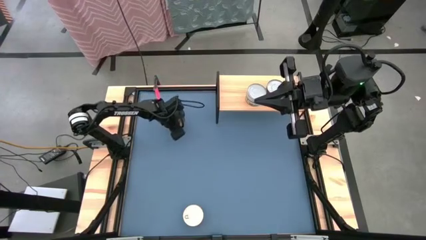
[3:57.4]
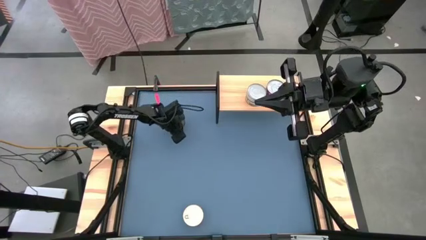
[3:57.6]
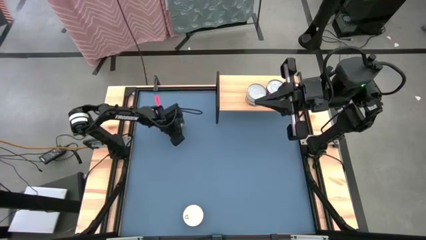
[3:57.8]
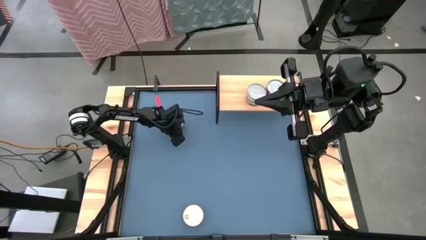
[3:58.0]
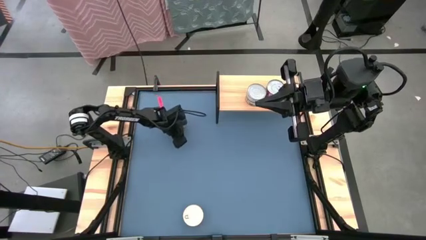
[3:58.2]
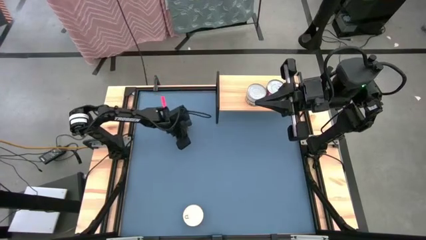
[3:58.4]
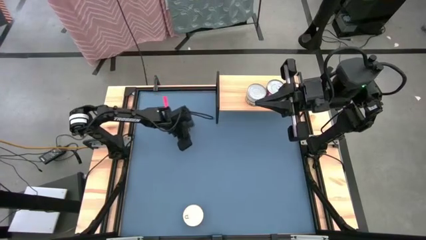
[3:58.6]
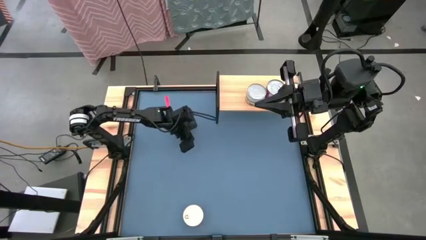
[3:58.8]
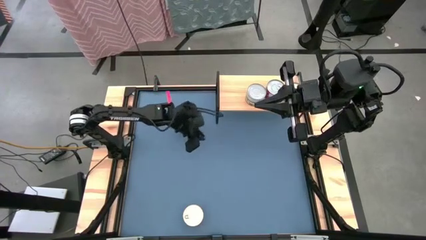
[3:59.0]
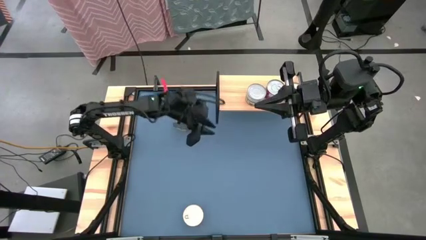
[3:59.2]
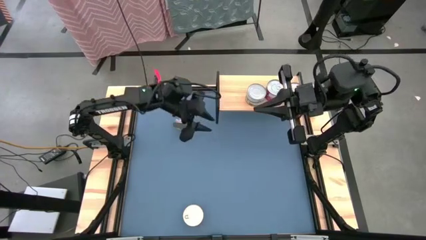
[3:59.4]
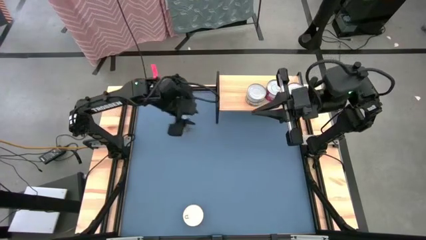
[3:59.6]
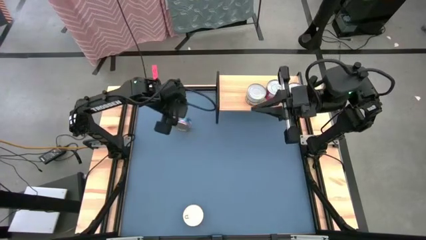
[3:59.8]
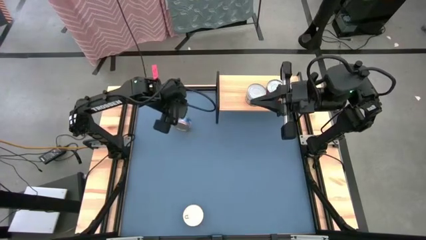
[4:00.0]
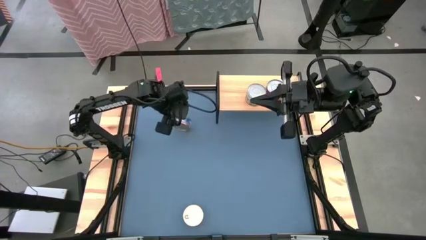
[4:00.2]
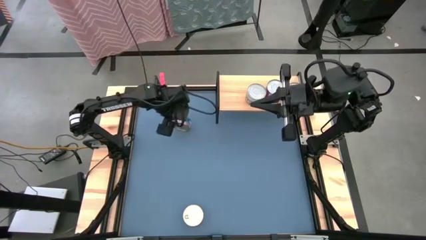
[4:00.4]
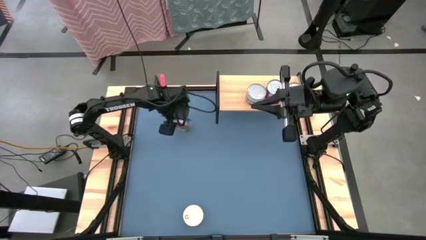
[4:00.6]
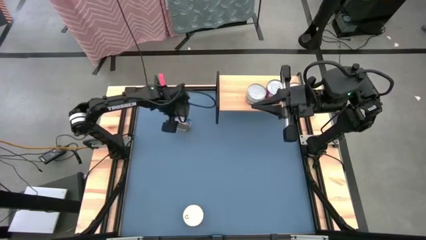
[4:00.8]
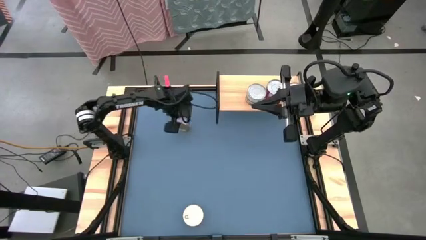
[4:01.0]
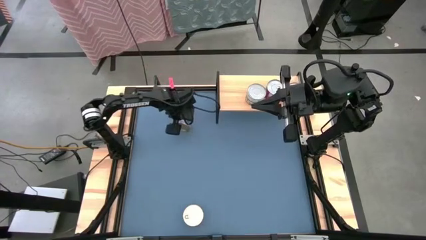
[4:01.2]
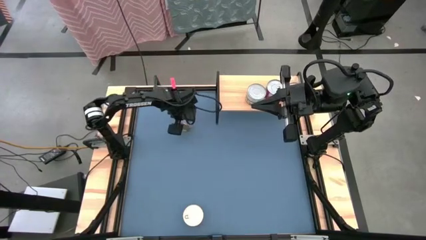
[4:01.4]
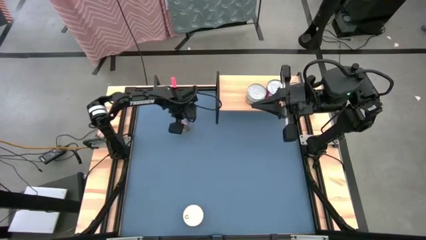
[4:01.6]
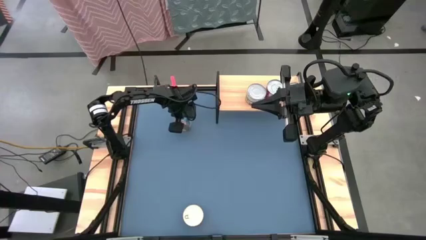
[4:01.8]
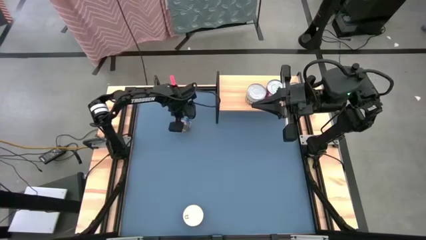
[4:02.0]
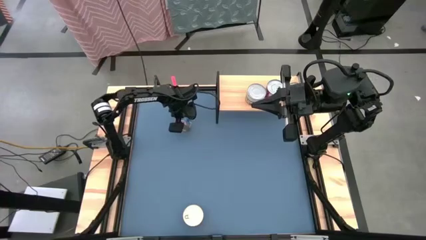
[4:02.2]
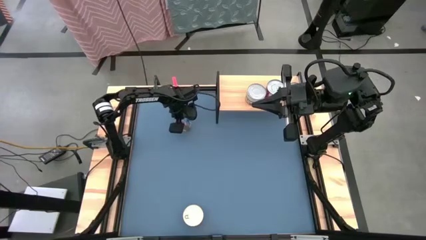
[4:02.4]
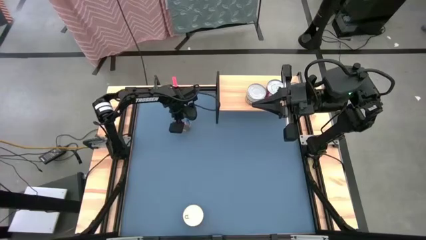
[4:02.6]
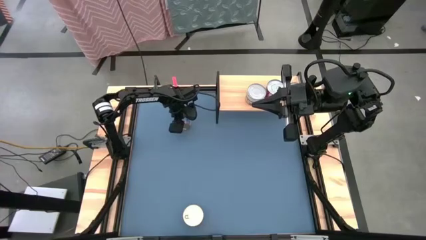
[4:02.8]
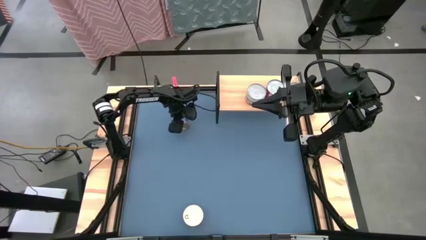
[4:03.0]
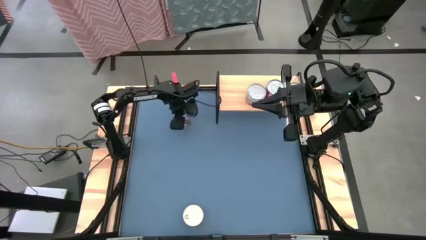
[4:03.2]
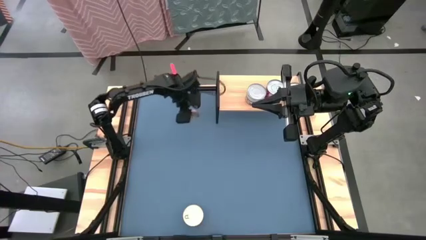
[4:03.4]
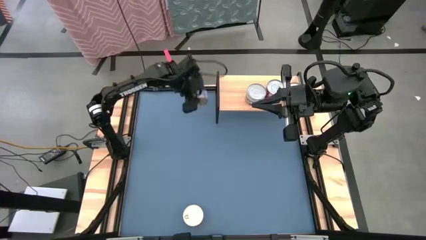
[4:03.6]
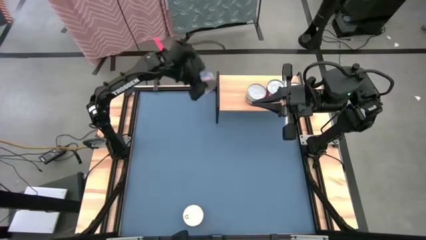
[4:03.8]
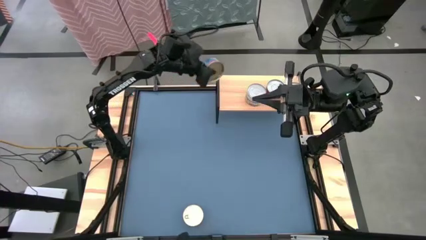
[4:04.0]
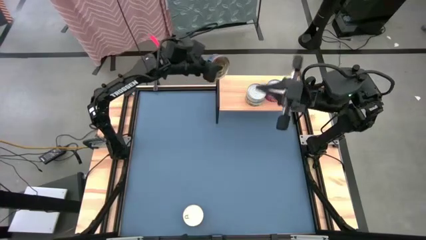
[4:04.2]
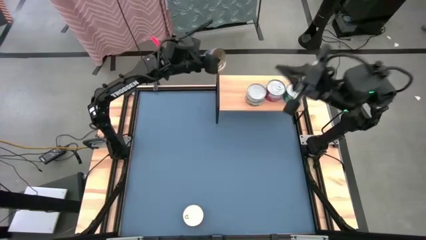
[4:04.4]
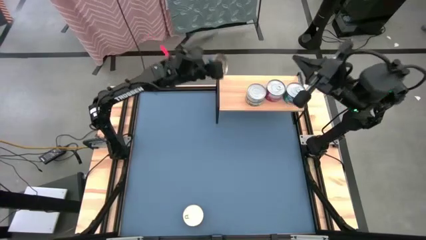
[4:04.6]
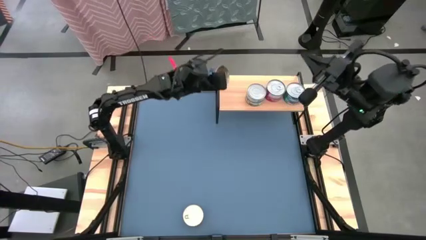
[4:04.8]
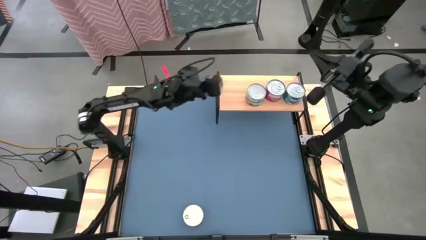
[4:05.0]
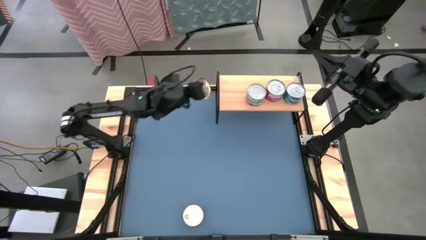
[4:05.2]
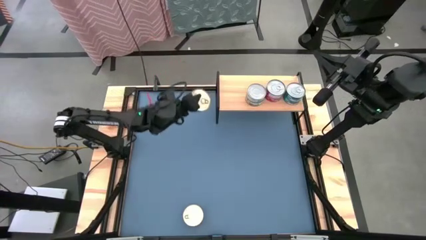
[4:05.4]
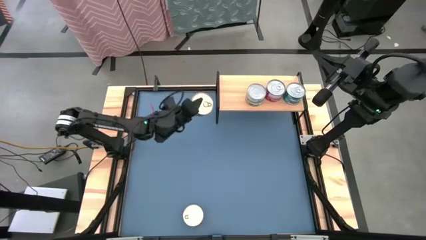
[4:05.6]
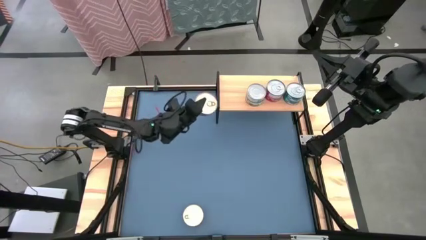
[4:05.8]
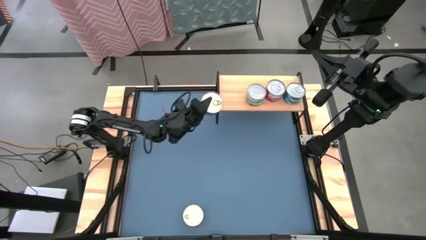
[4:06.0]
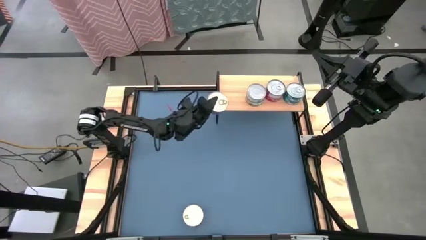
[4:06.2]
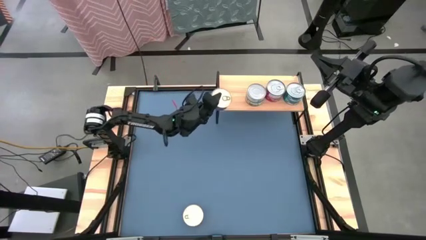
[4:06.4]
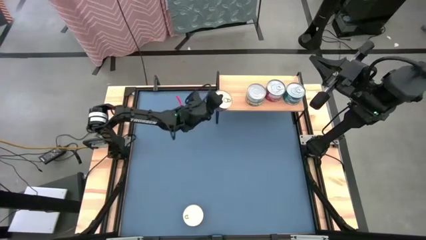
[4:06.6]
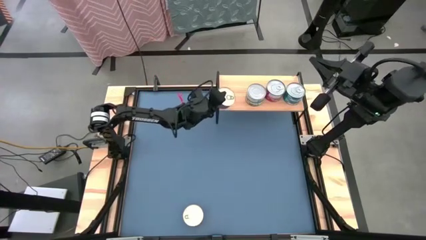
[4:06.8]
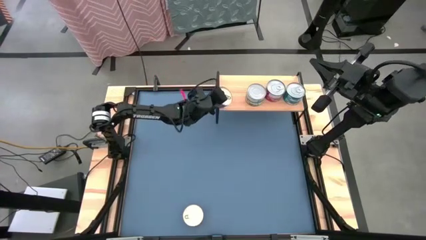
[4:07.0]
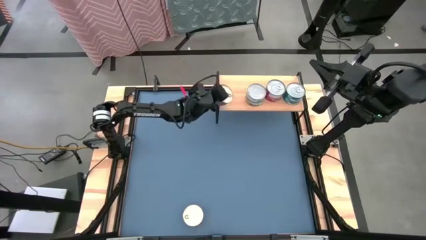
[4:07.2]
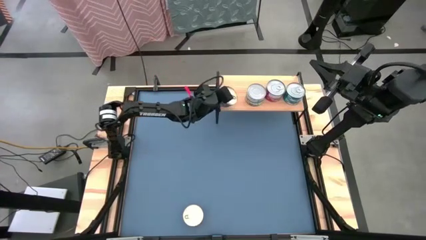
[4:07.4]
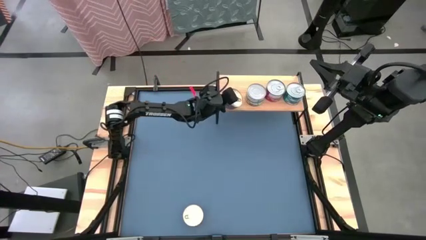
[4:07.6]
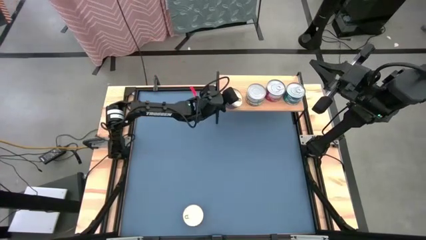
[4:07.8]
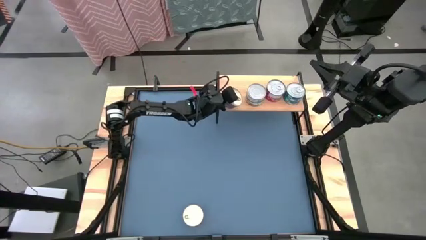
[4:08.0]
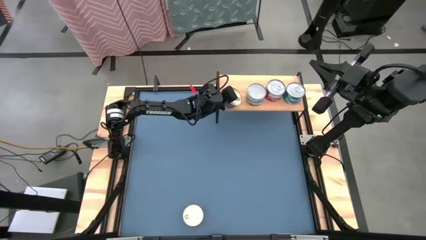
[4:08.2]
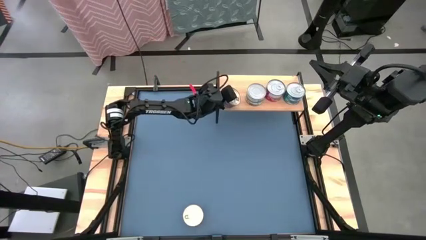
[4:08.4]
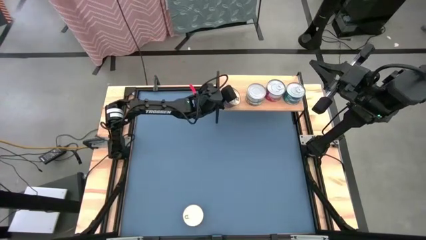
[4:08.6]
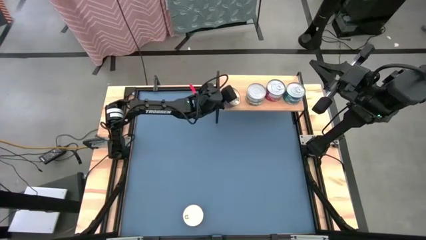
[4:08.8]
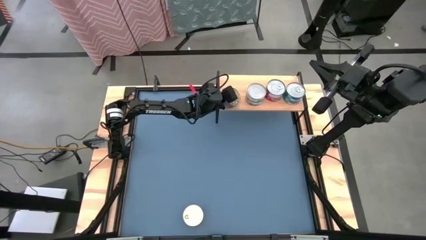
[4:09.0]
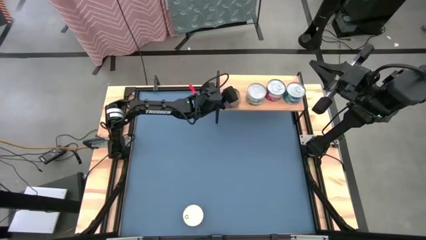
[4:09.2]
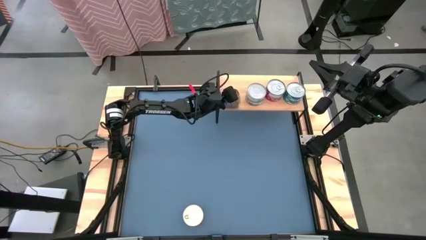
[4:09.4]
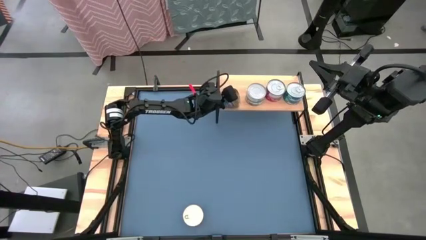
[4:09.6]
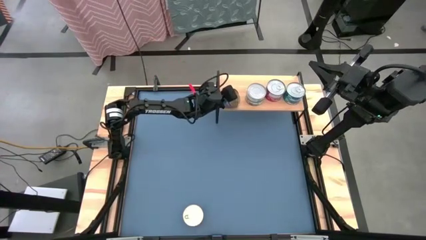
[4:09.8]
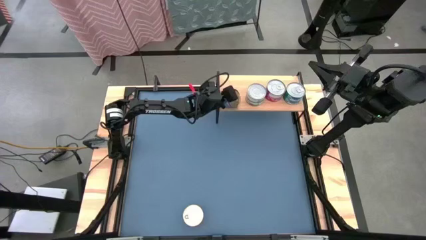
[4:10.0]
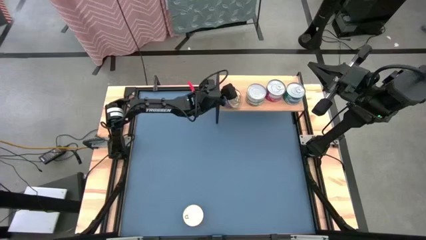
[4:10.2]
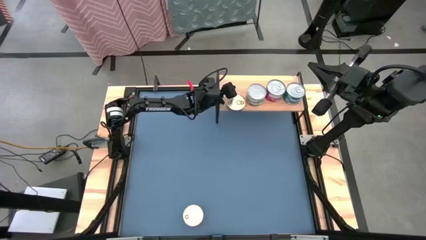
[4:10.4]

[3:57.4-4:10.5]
Task: Stack canned seafood by type on shelf
Put the top blue-pink tuna can on the shelf

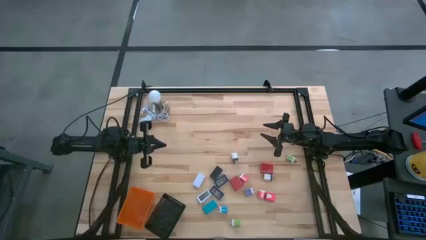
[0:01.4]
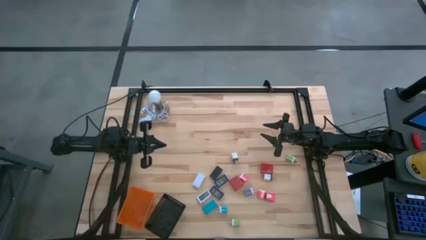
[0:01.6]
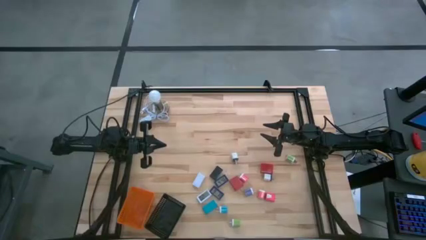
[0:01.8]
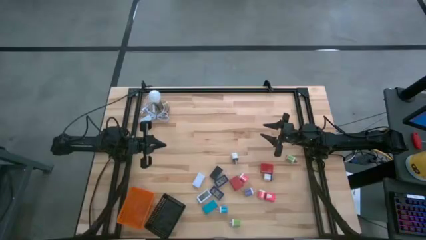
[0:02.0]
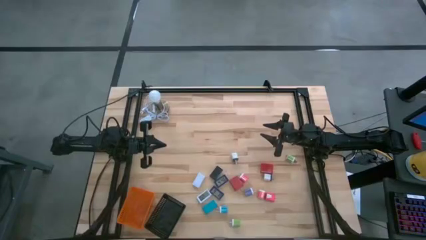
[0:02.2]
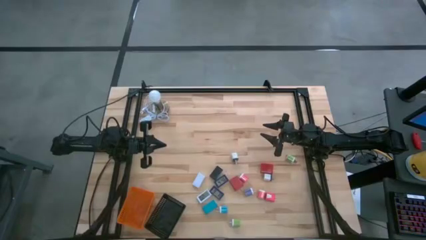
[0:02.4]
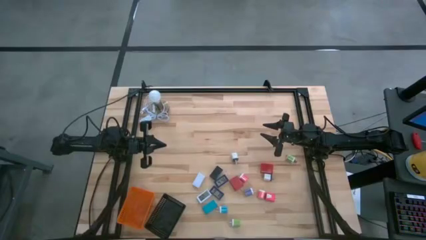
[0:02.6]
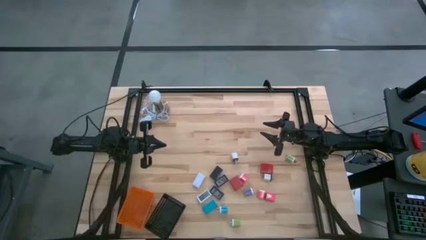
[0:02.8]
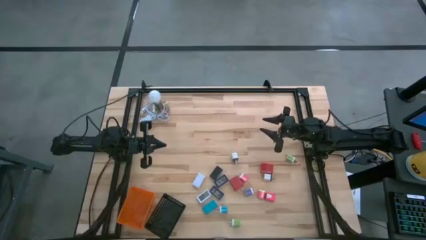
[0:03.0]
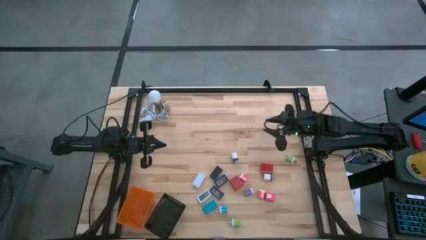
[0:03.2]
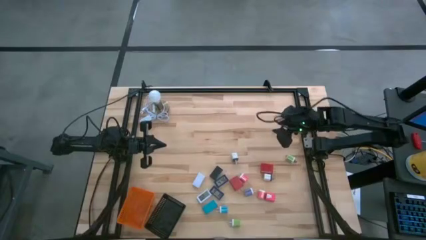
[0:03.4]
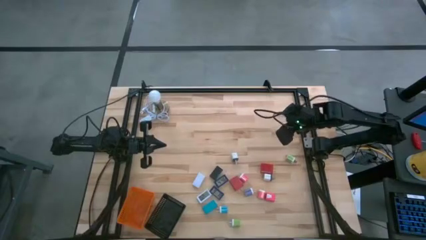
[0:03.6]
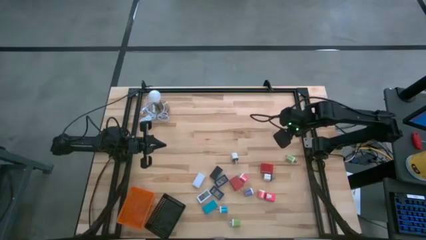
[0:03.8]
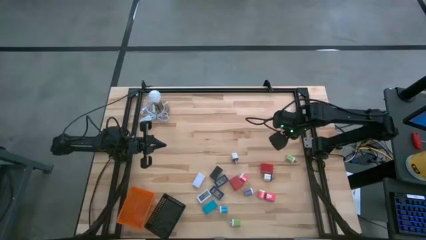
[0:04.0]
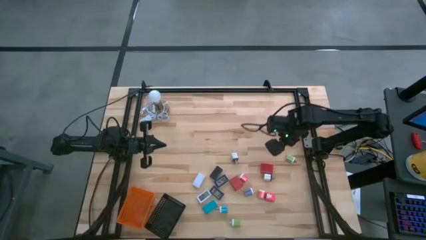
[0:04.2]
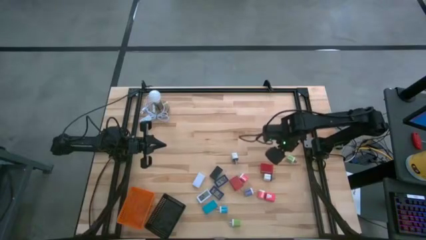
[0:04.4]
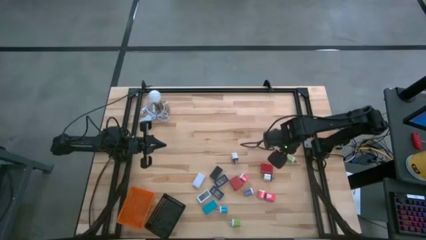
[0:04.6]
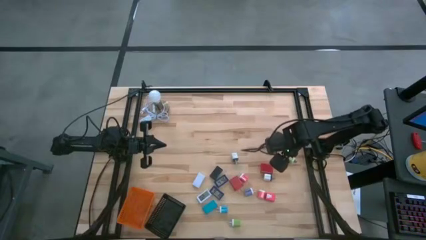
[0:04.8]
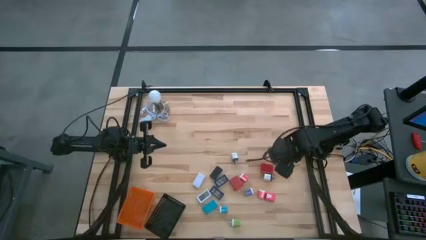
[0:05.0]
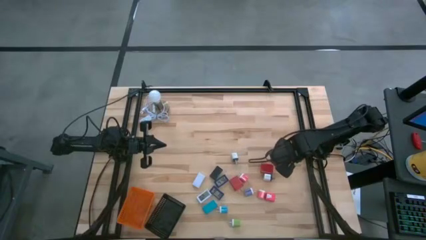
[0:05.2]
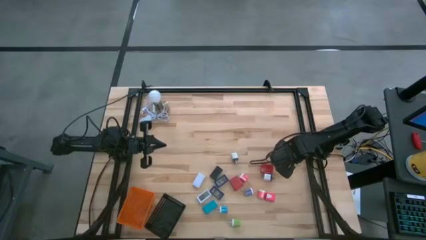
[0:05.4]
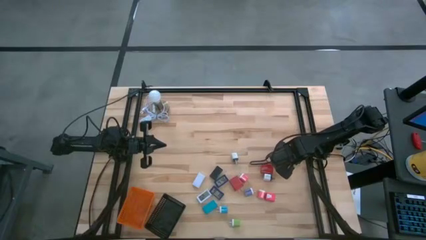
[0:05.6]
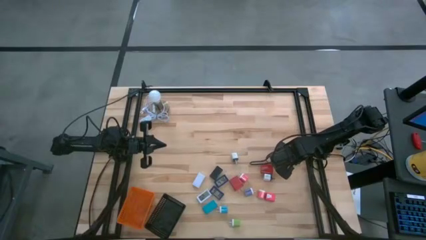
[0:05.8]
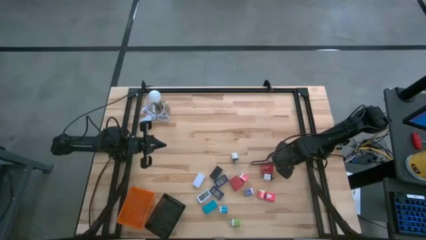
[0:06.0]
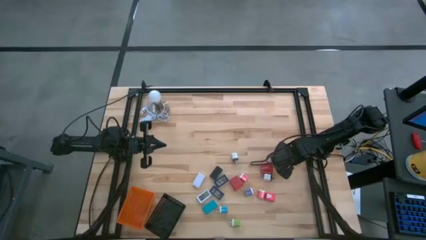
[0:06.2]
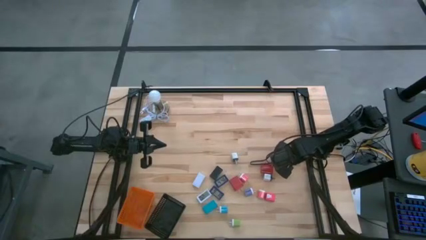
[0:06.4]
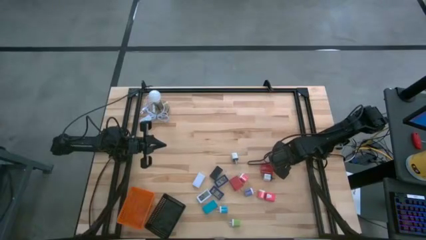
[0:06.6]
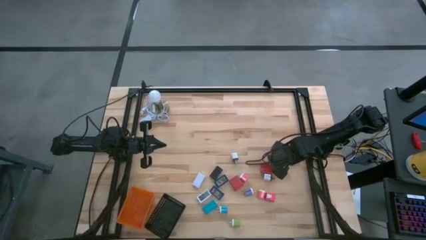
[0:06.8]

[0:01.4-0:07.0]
Task: Pick & Place Office items
Put the top green charger adapter into the black basket
